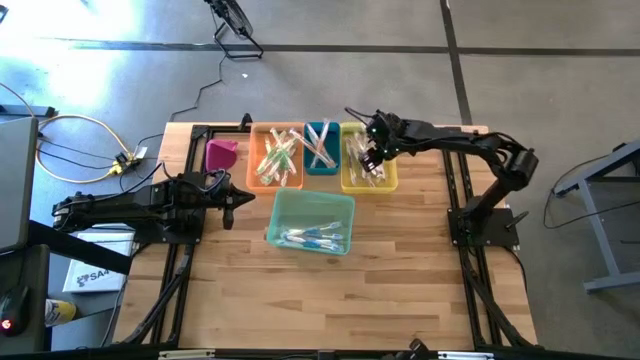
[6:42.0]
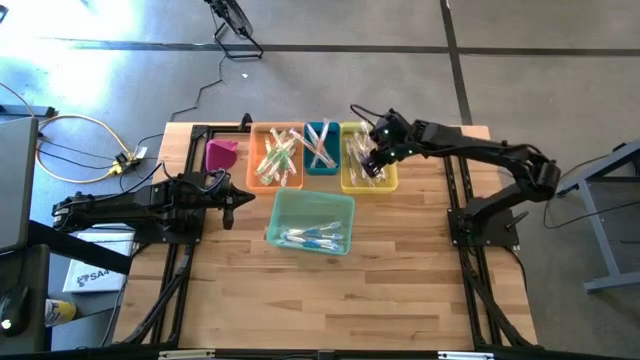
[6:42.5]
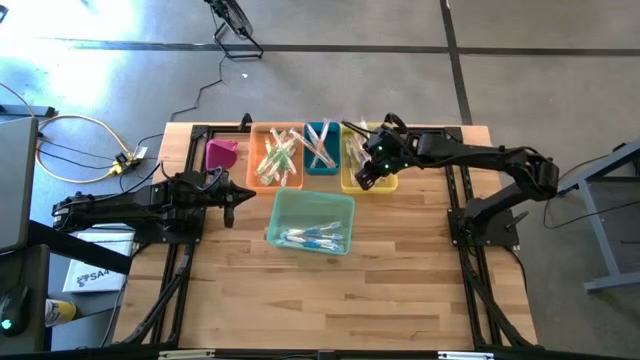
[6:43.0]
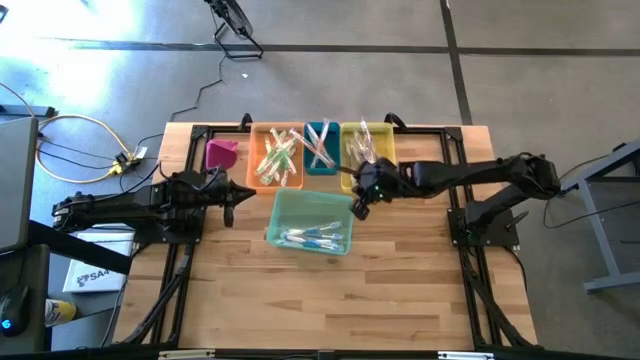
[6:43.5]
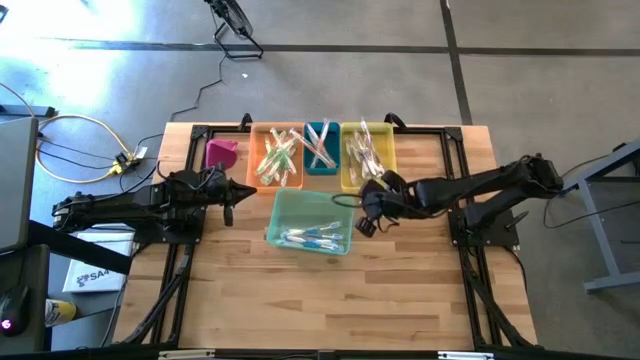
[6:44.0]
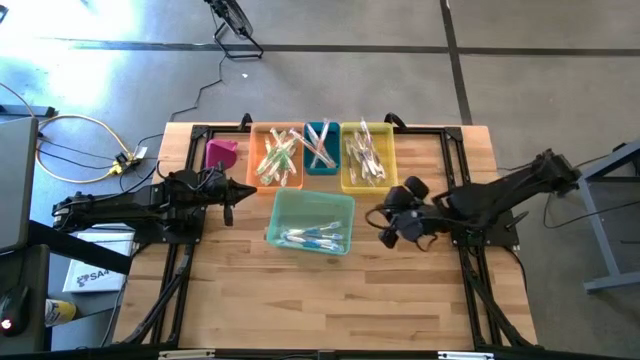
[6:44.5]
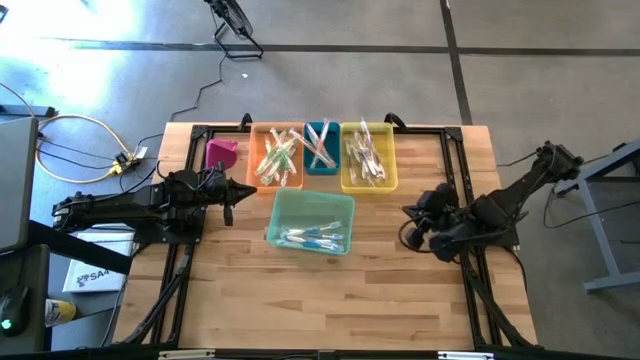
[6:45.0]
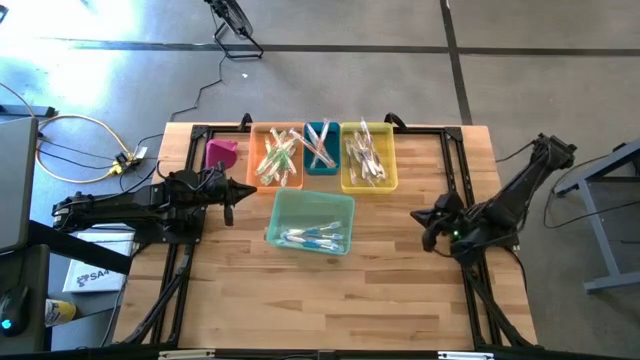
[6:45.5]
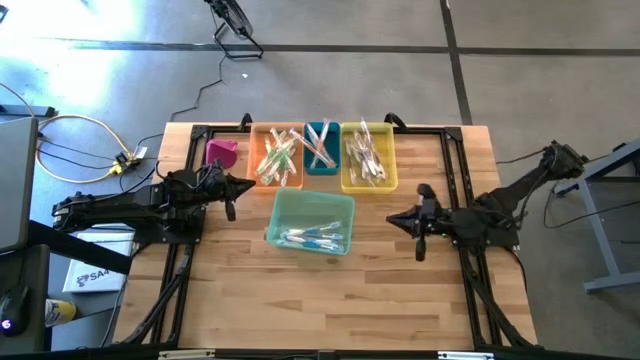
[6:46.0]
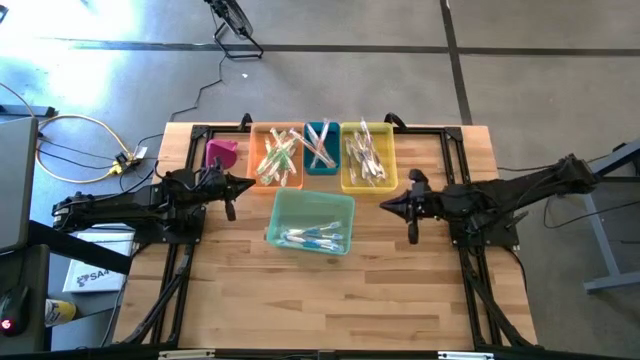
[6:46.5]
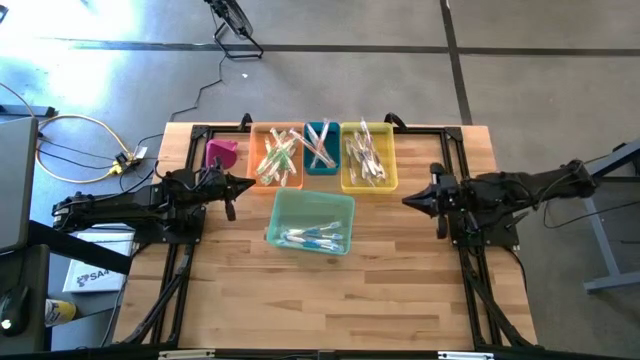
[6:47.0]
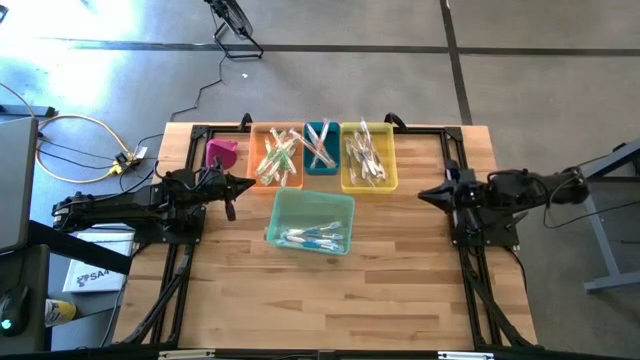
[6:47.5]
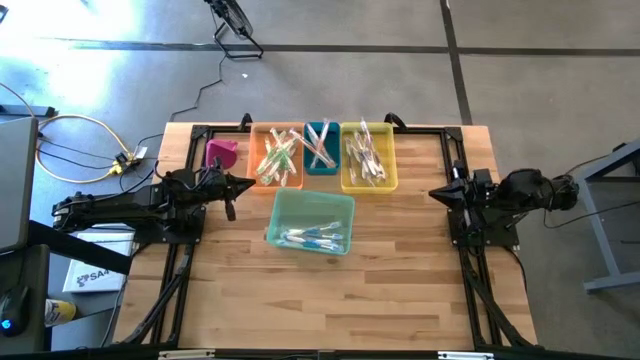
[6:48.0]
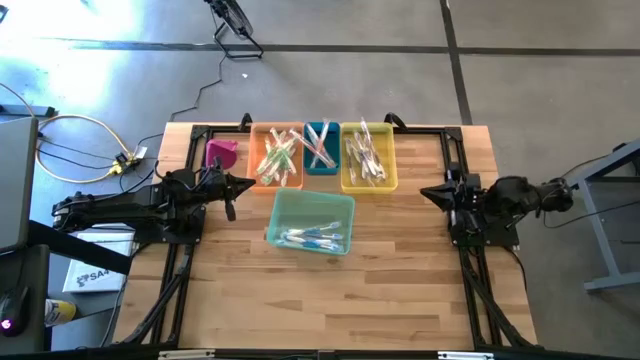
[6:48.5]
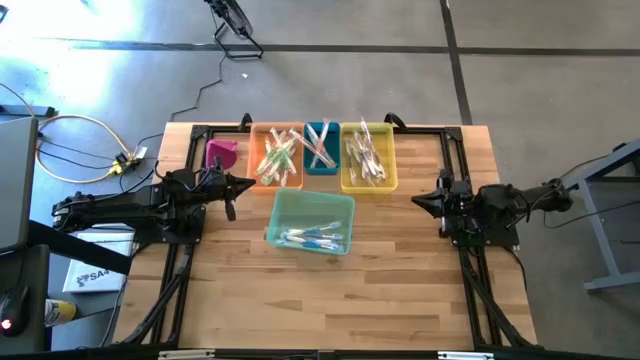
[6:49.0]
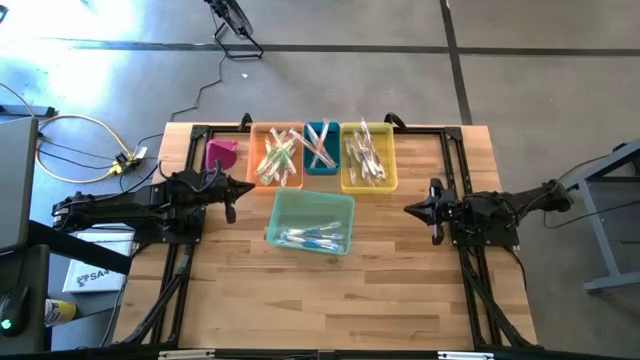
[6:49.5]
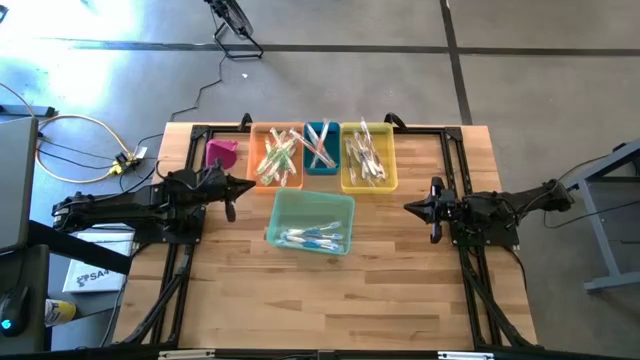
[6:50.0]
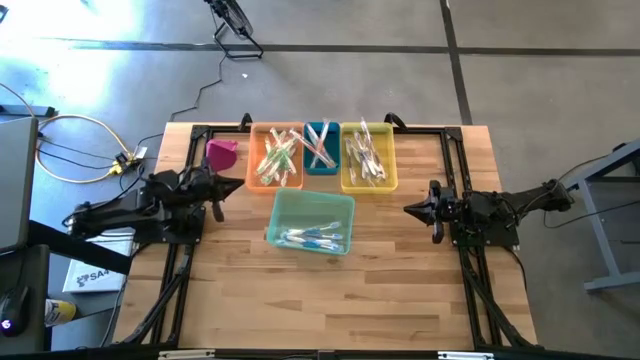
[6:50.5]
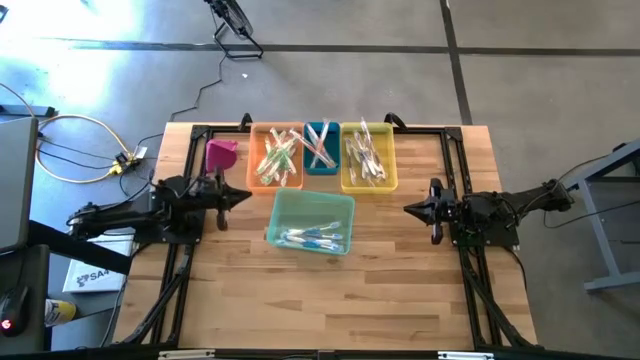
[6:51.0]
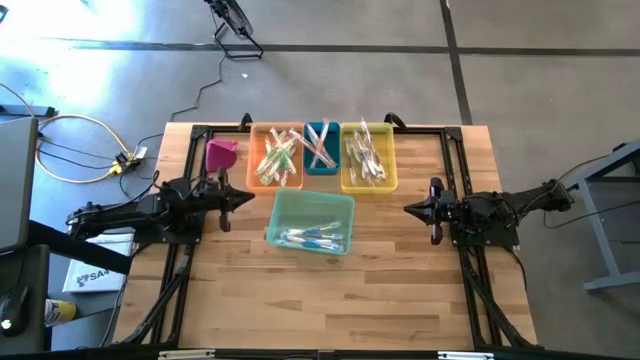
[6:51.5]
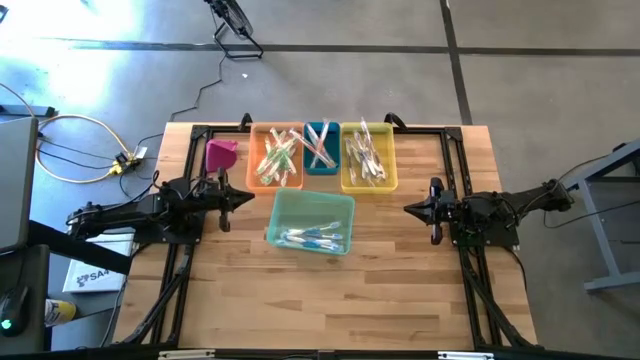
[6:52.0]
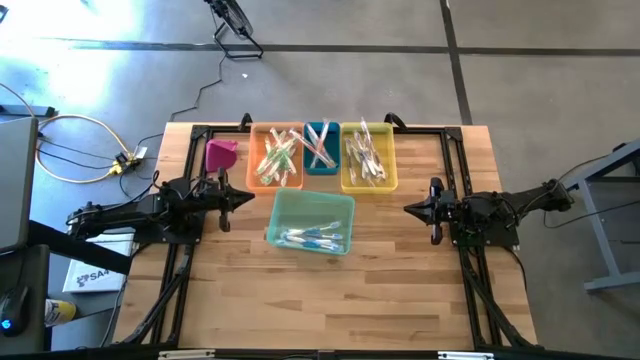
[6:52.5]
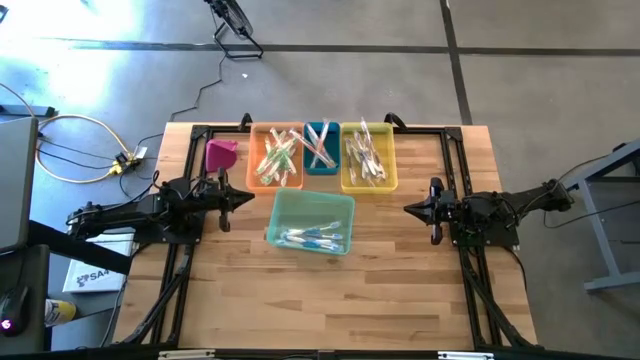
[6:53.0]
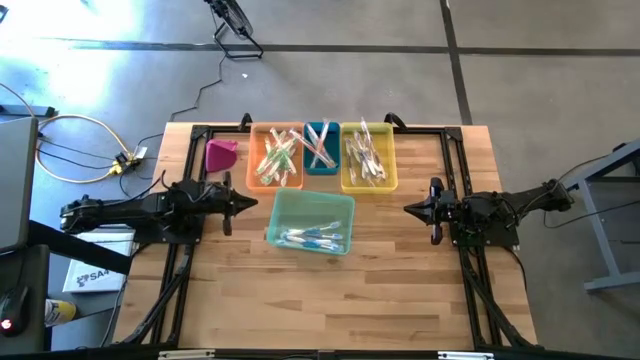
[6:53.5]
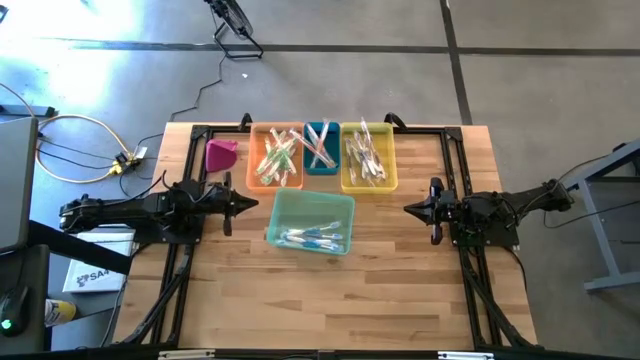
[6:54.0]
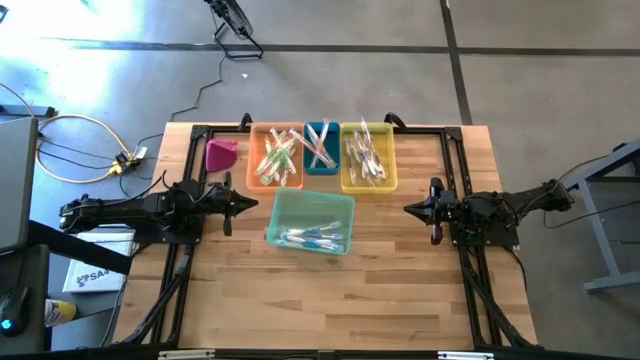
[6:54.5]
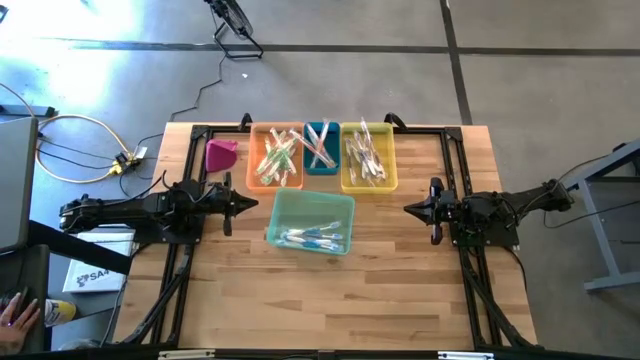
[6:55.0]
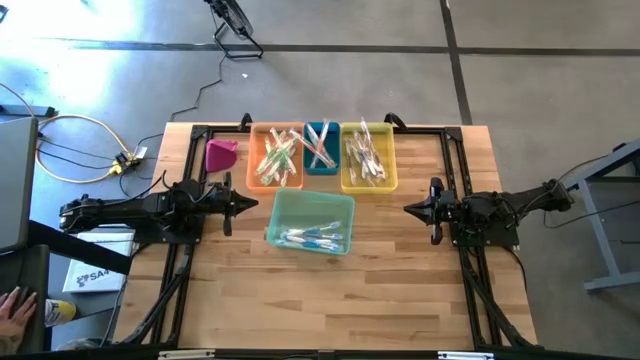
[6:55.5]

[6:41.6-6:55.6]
Task: Pick & Place Toothbrushes
Return to Home Position
